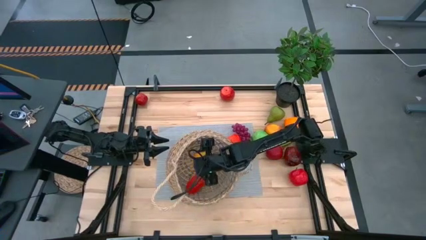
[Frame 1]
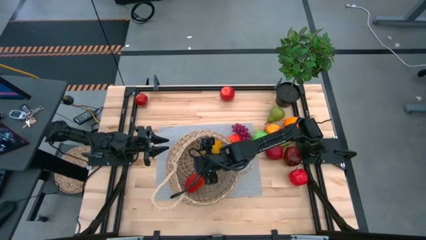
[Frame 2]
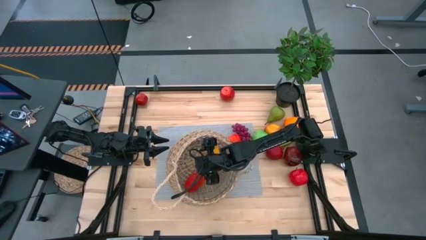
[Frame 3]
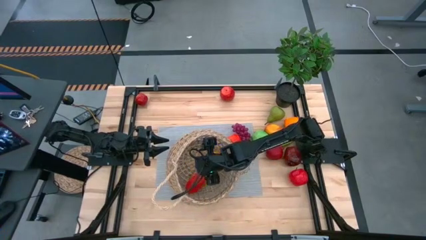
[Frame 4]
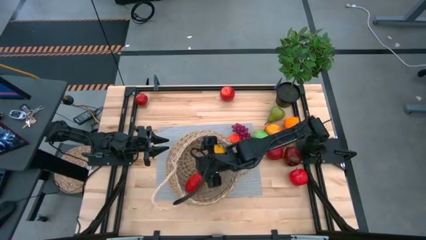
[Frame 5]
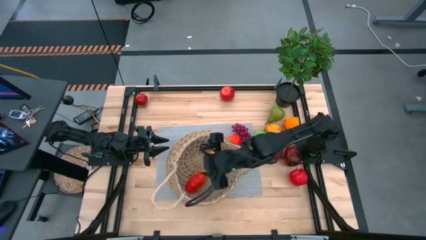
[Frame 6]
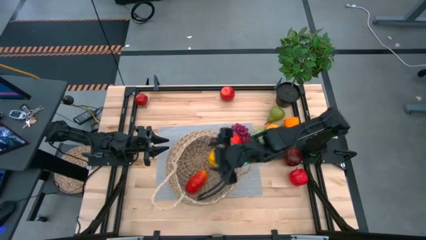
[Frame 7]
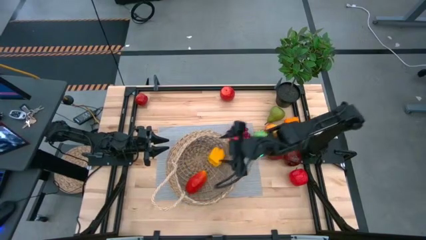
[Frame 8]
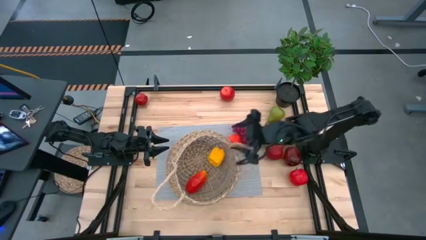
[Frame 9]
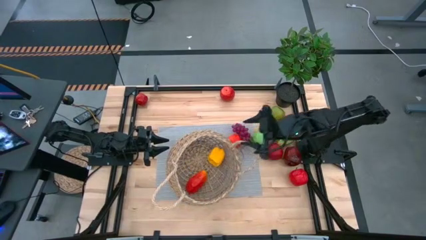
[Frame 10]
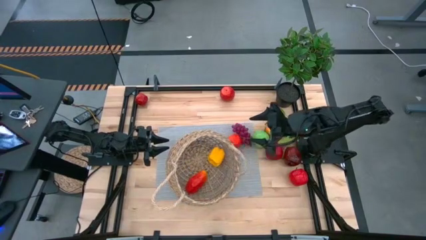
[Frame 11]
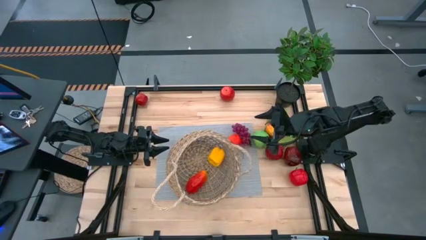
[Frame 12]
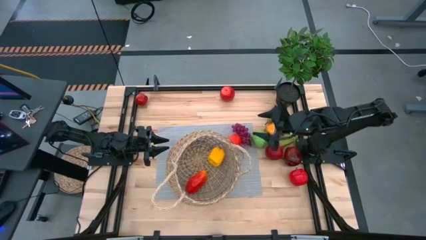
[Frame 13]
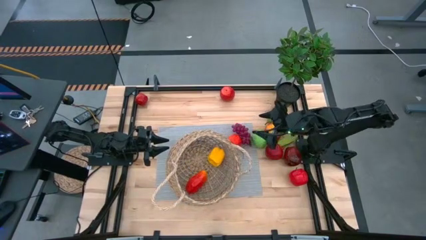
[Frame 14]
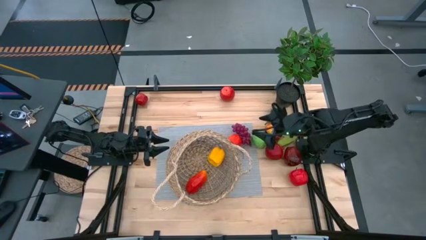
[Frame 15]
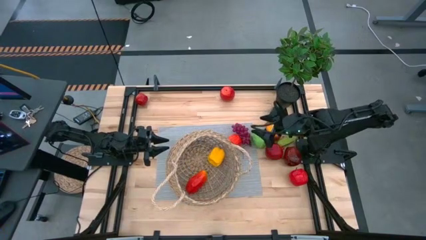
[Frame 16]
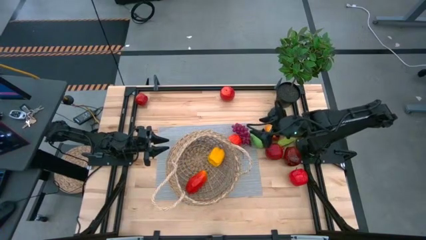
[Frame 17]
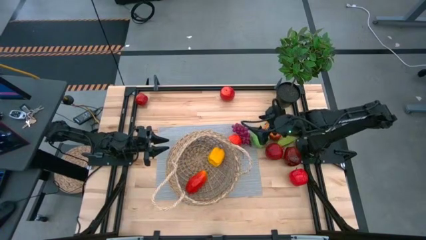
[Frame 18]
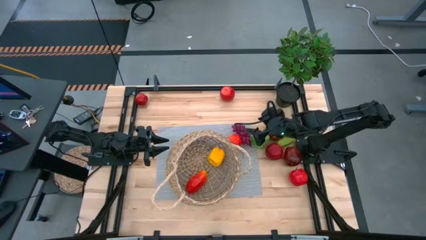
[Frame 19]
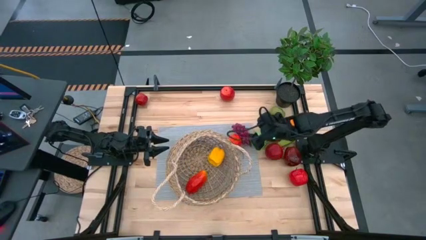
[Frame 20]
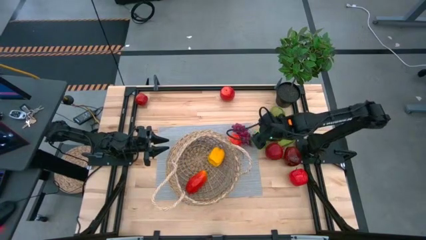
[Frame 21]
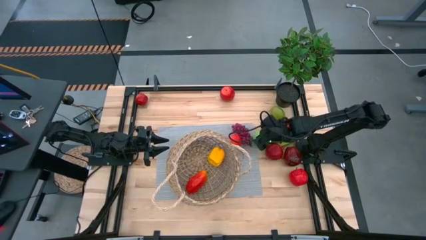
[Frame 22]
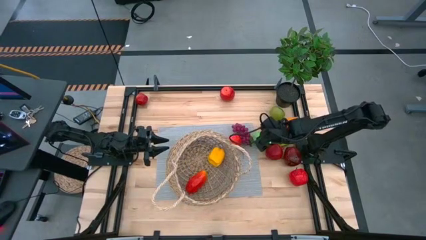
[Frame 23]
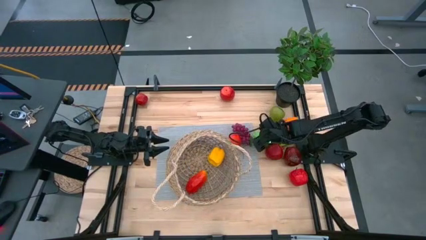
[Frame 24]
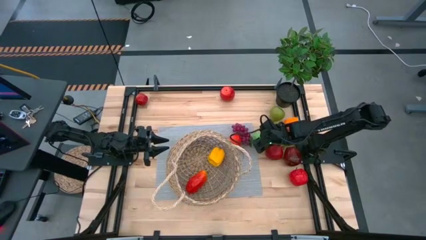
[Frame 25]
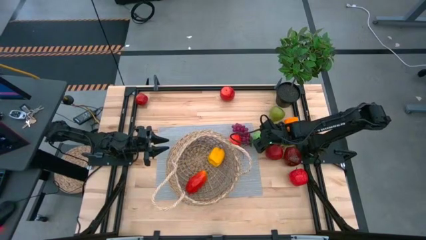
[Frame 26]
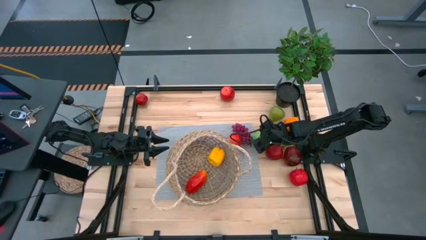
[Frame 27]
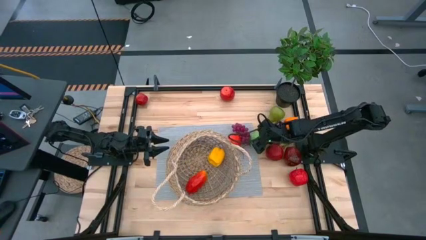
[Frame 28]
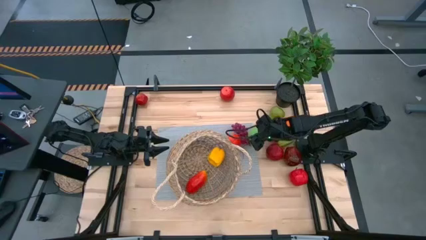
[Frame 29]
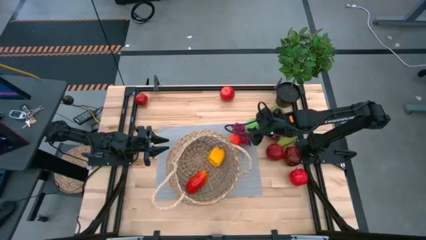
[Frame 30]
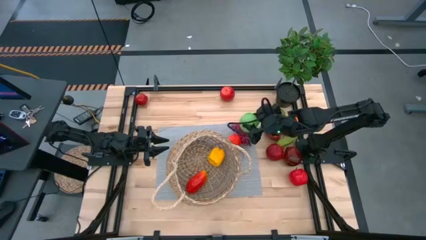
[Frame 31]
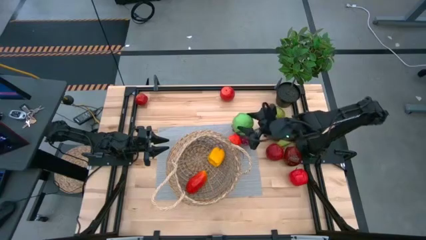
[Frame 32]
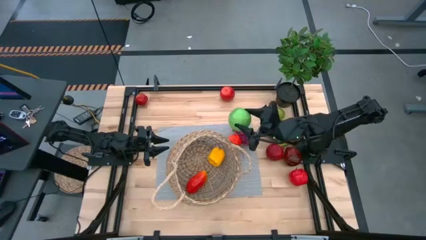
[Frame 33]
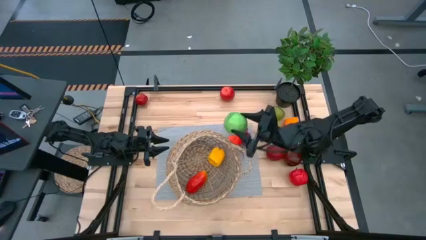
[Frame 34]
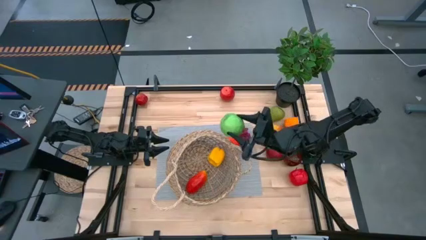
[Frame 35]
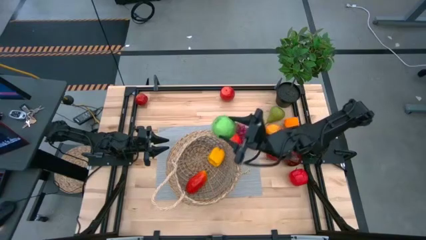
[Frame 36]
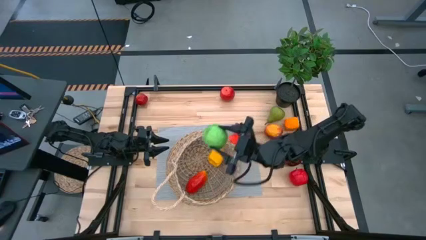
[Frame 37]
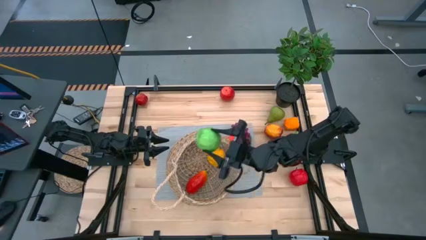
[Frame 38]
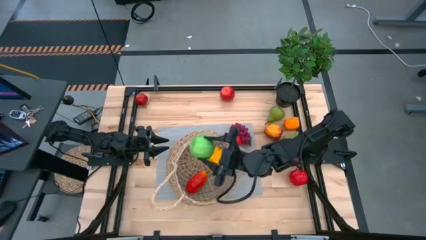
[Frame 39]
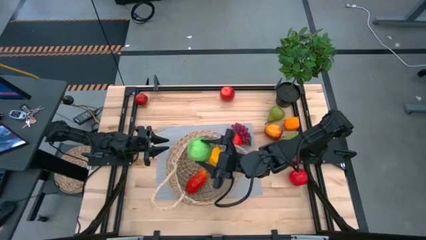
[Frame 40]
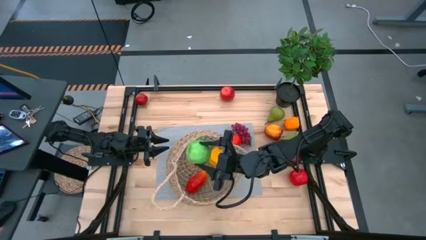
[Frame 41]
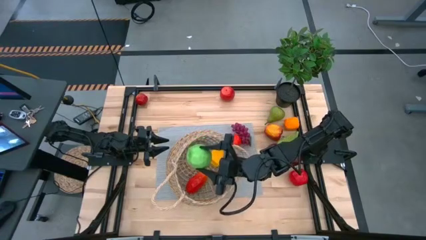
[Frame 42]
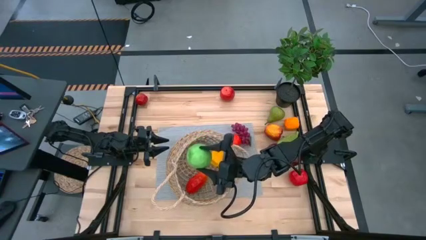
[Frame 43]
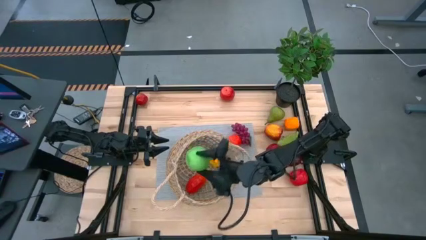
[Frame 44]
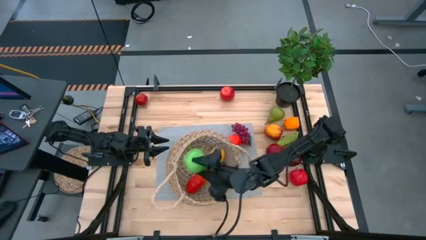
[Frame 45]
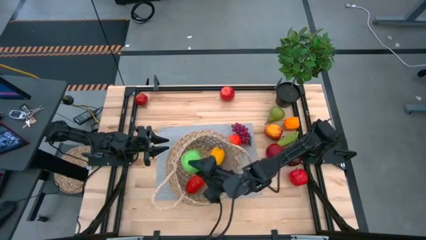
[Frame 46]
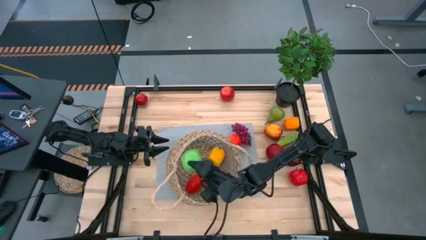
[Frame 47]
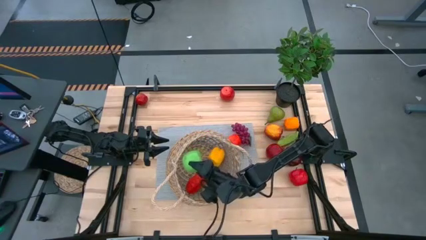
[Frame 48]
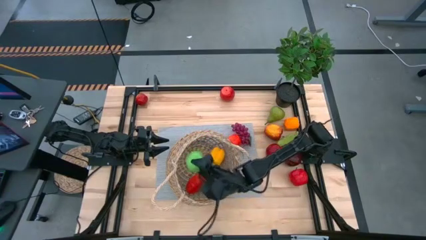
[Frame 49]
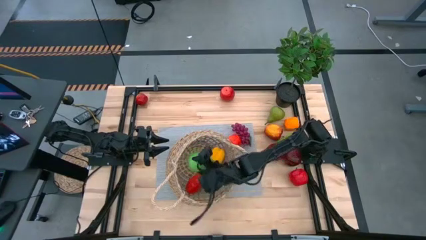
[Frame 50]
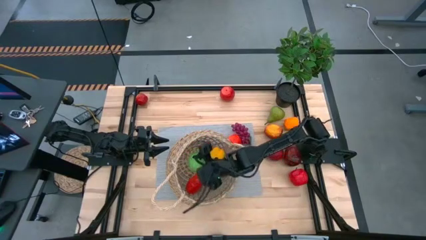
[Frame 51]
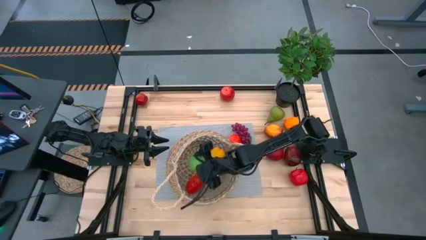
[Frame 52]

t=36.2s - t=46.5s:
Task: Build produce basket
Put the green apple into the brown basket

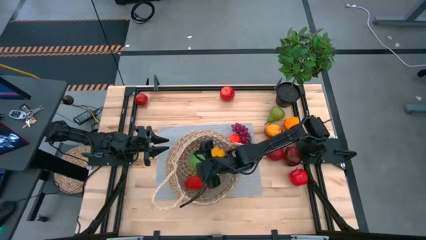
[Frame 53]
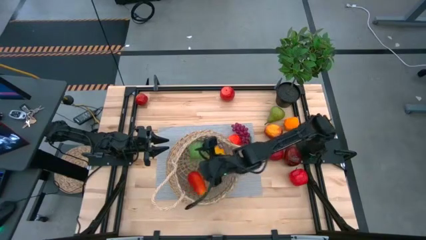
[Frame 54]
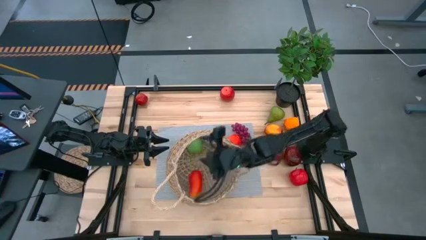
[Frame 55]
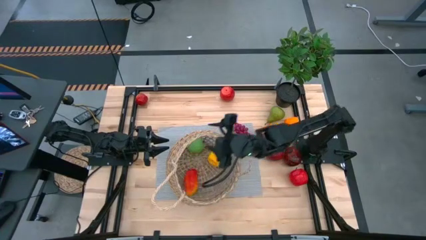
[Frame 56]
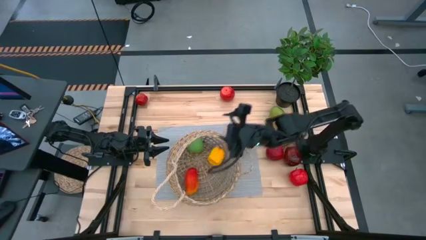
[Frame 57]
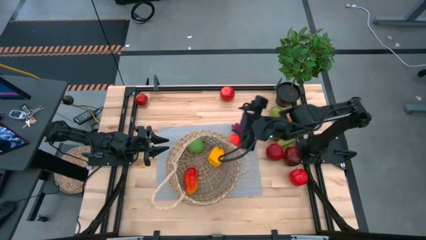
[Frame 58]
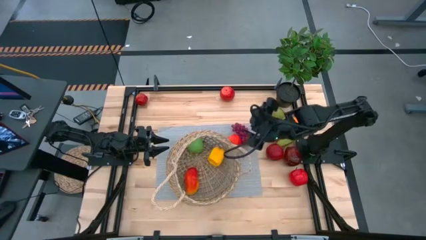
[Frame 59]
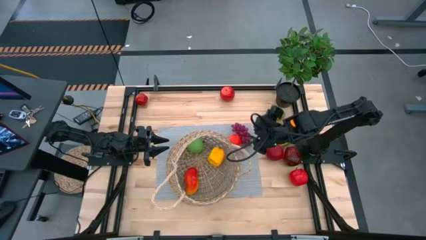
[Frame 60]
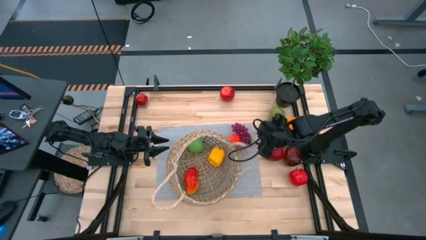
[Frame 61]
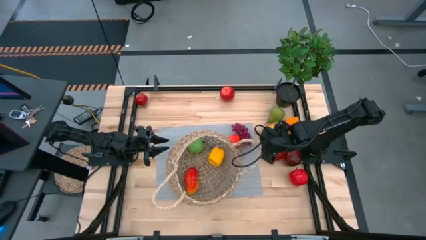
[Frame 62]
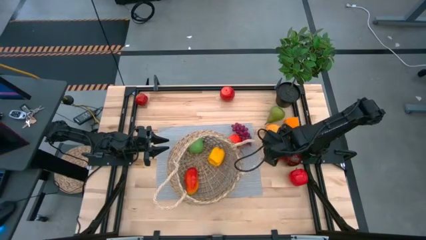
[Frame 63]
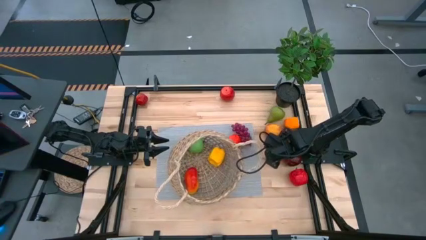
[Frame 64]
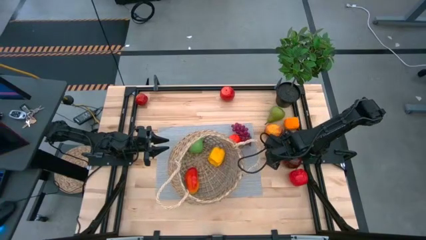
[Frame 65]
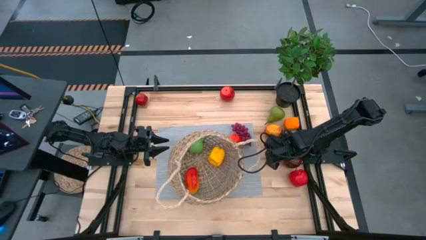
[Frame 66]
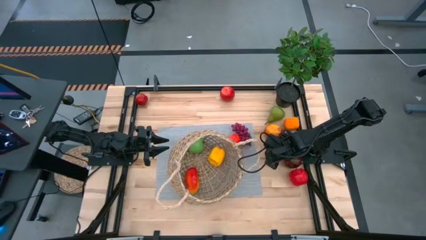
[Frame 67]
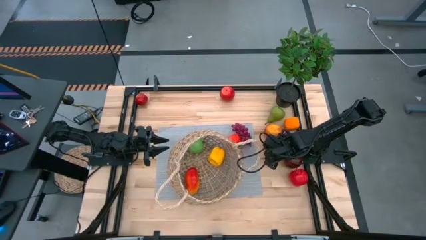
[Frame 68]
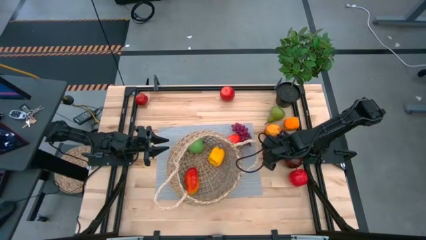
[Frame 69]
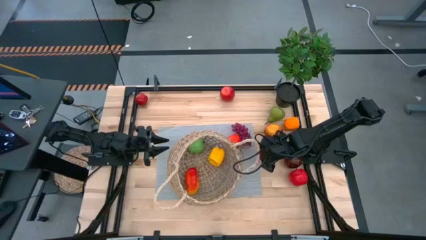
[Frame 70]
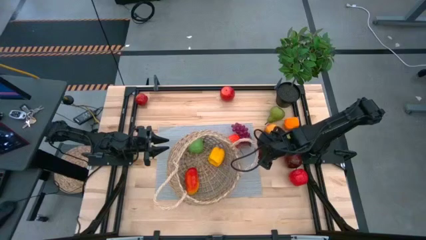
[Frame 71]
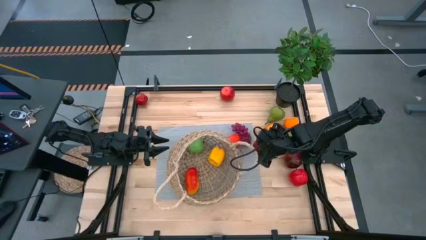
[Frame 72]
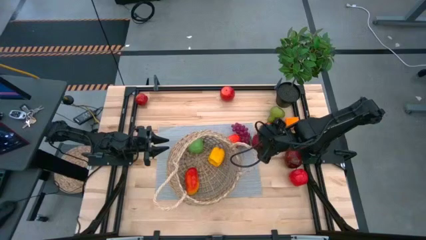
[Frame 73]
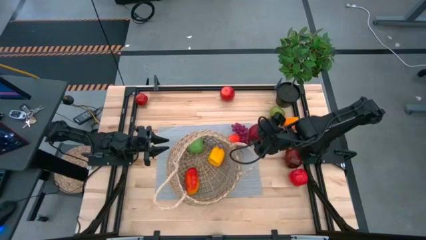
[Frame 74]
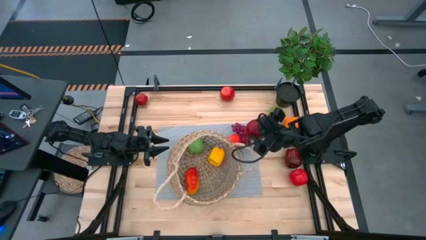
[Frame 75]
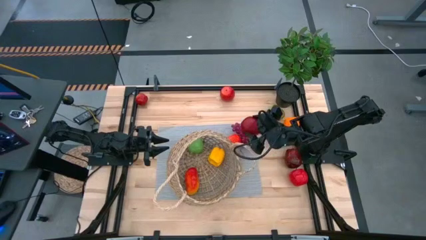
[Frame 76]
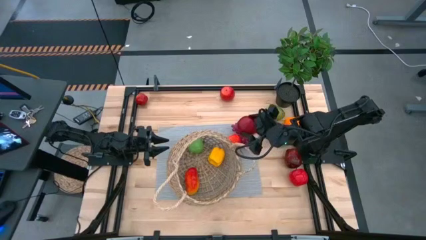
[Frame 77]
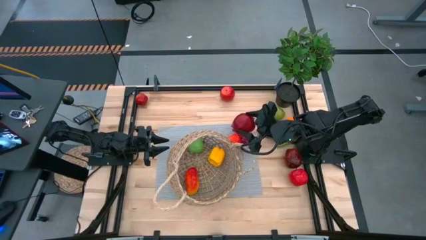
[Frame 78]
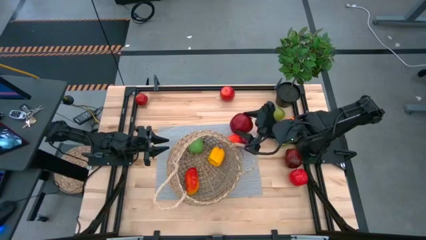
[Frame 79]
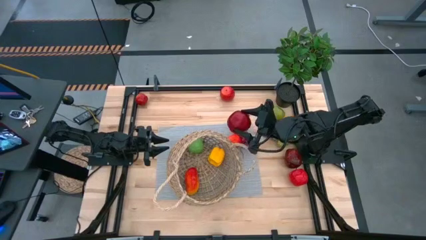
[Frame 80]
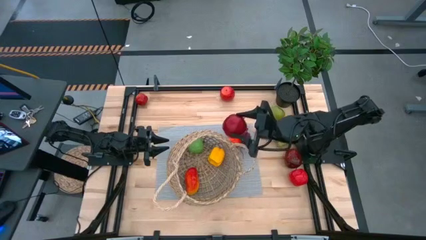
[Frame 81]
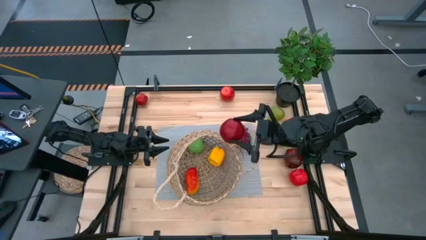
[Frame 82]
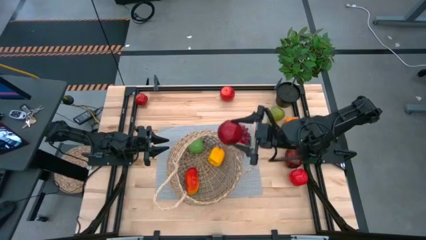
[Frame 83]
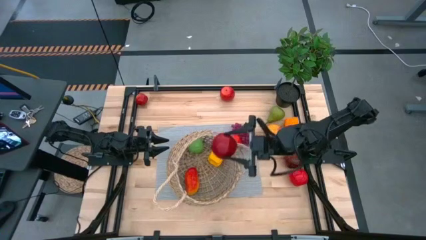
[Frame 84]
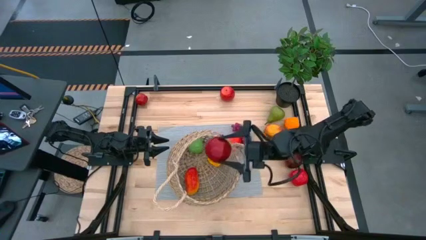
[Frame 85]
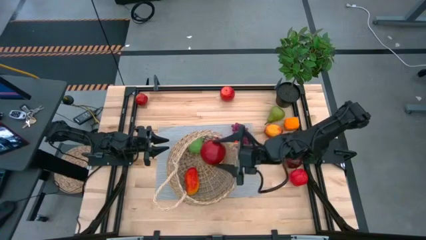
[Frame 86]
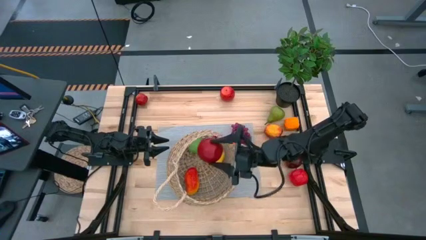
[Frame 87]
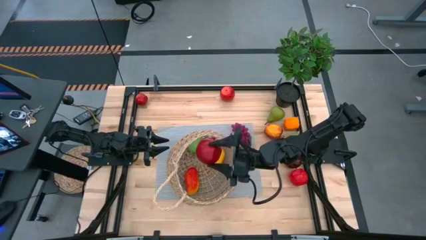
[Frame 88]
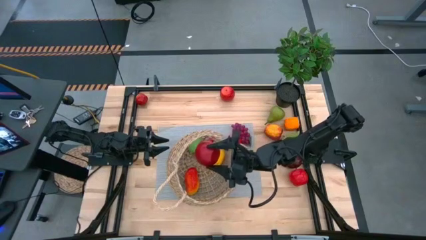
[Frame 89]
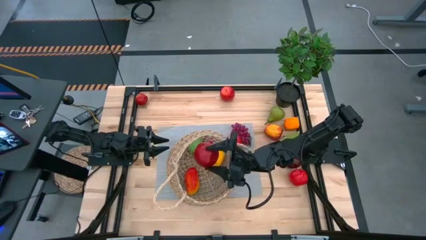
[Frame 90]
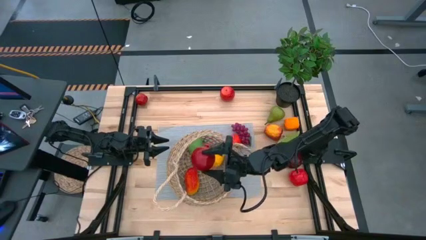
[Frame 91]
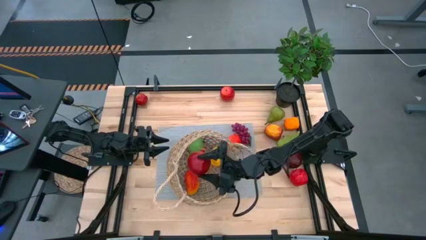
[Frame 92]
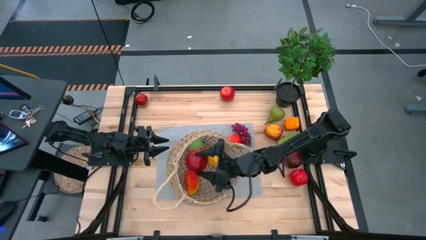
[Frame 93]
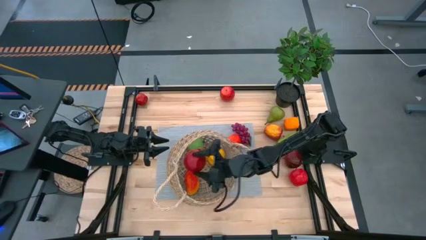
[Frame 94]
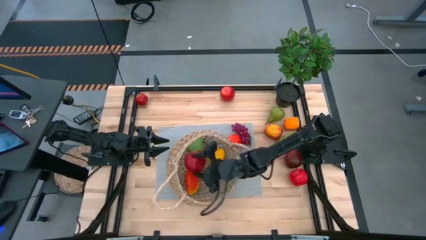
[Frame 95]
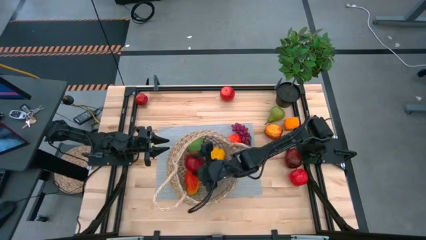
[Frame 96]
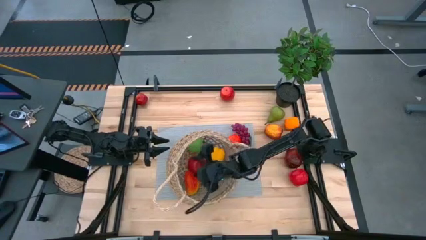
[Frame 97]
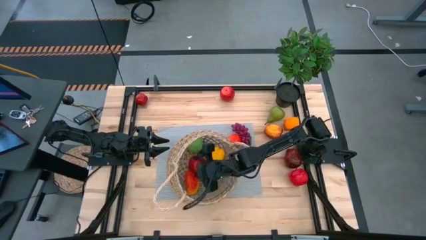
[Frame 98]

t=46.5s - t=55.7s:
Put the red pomegranate into the brown basket
